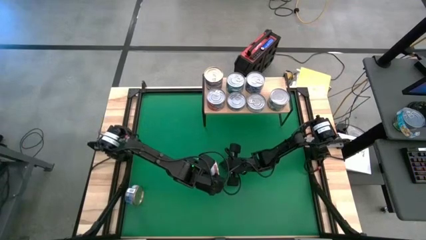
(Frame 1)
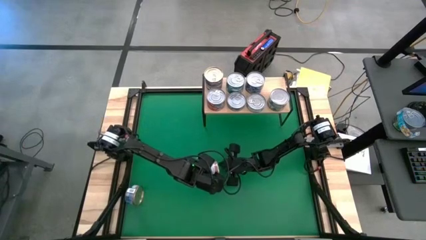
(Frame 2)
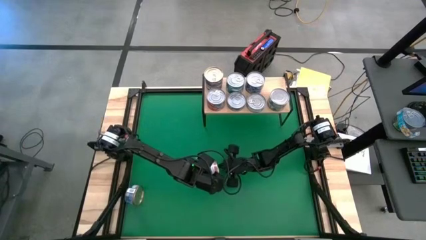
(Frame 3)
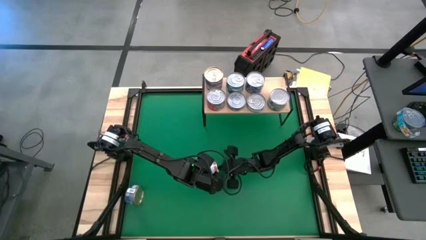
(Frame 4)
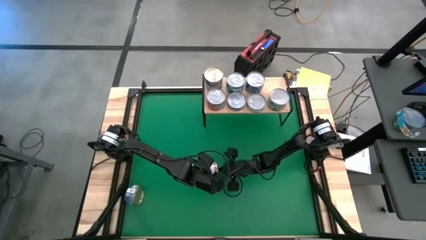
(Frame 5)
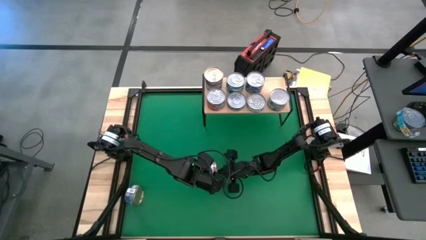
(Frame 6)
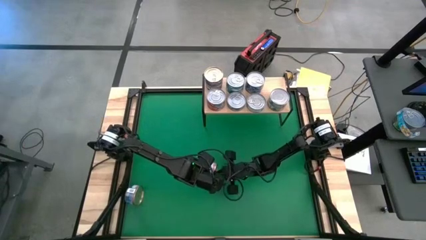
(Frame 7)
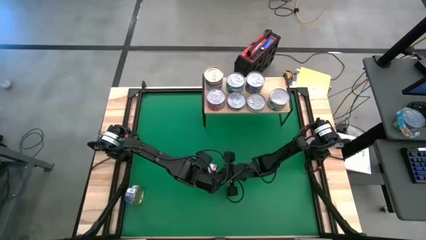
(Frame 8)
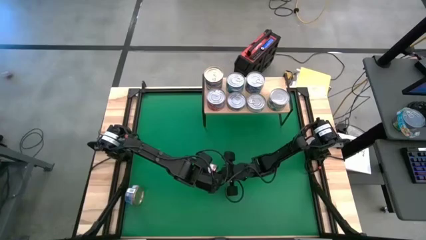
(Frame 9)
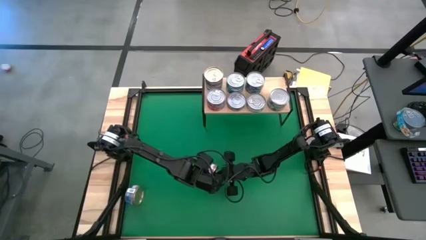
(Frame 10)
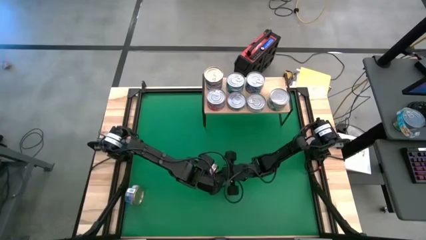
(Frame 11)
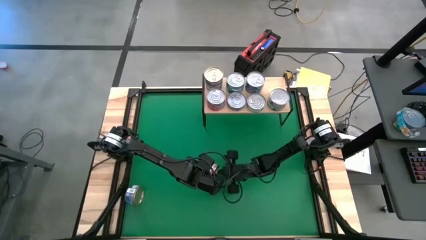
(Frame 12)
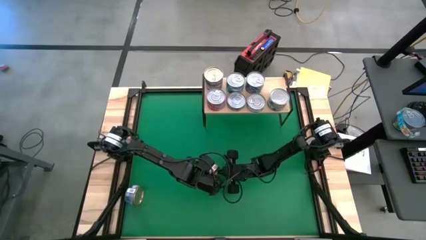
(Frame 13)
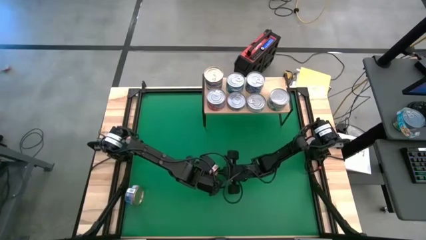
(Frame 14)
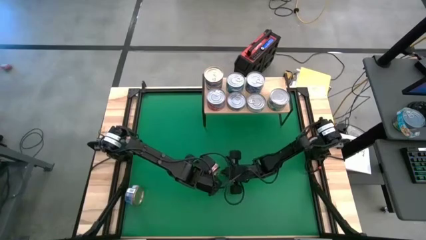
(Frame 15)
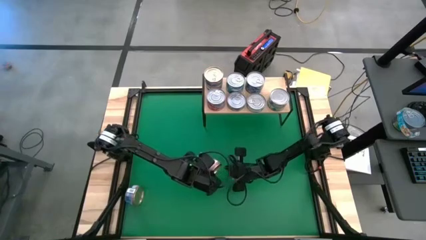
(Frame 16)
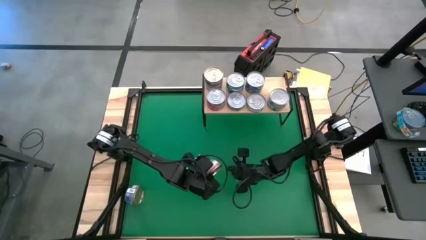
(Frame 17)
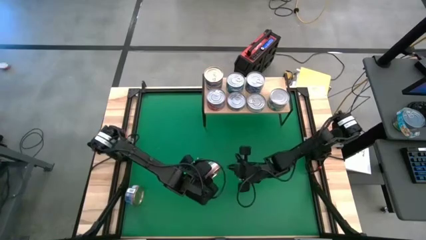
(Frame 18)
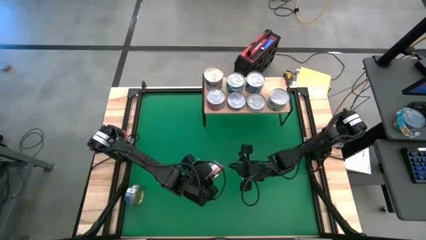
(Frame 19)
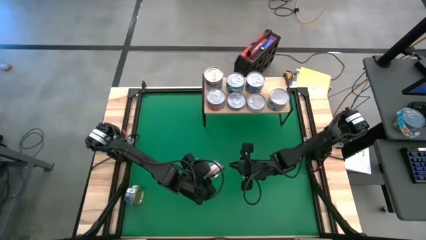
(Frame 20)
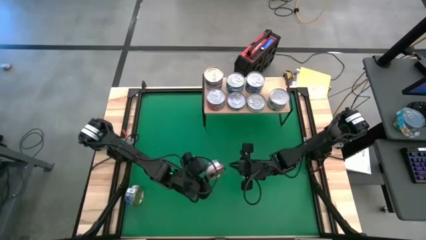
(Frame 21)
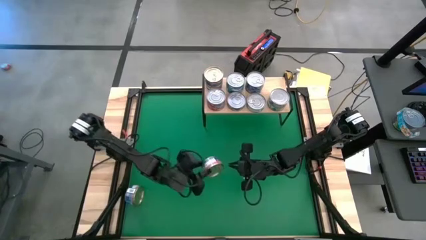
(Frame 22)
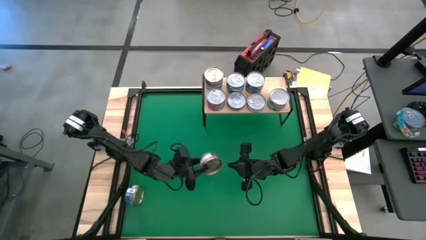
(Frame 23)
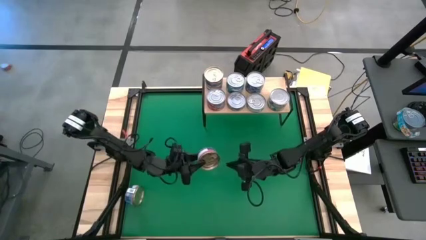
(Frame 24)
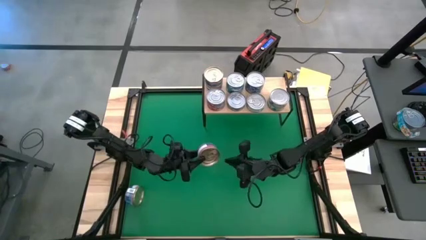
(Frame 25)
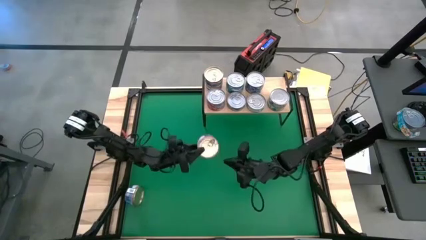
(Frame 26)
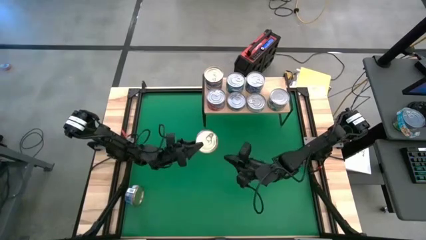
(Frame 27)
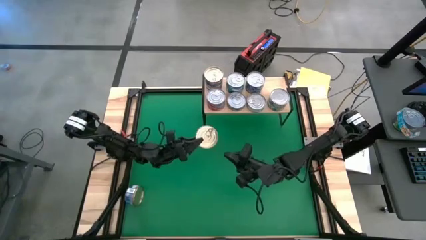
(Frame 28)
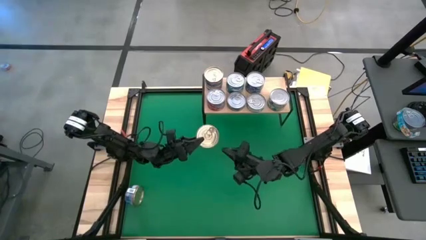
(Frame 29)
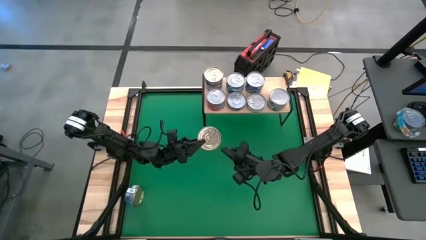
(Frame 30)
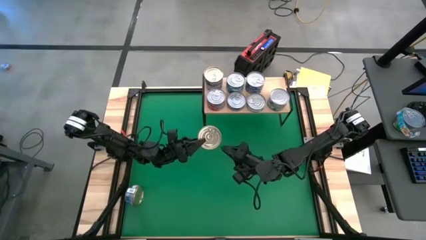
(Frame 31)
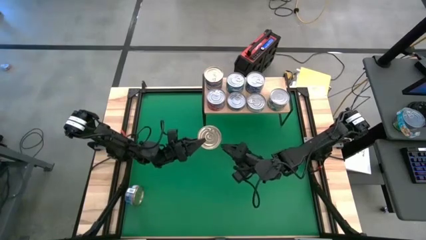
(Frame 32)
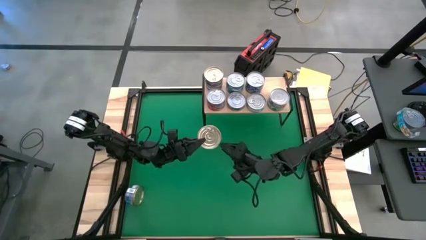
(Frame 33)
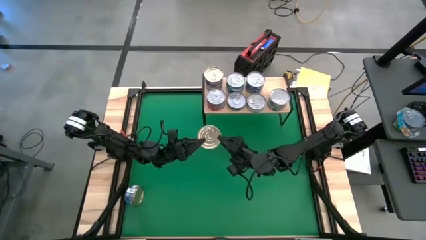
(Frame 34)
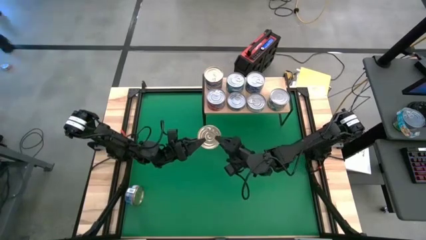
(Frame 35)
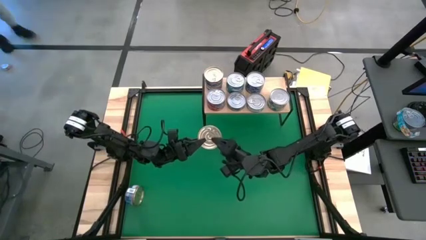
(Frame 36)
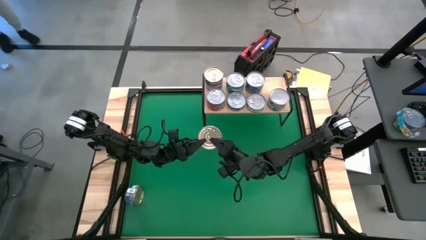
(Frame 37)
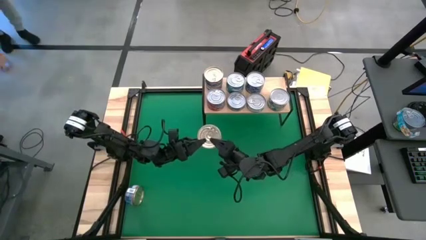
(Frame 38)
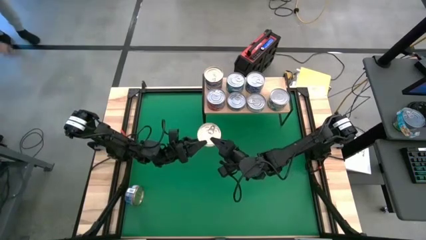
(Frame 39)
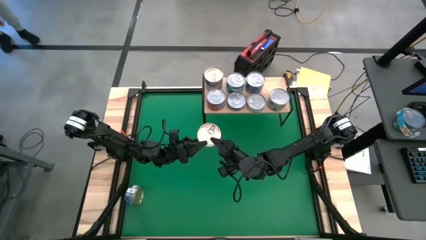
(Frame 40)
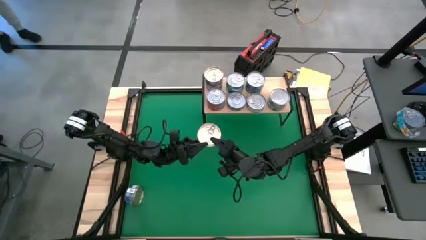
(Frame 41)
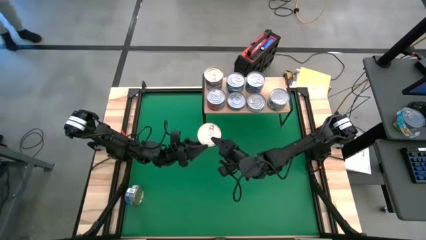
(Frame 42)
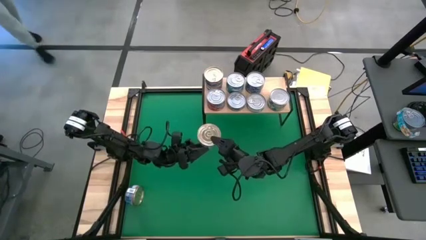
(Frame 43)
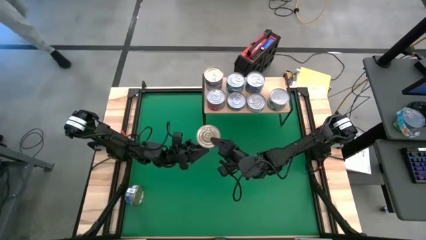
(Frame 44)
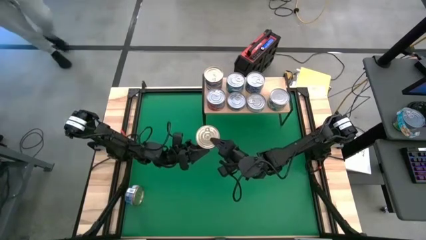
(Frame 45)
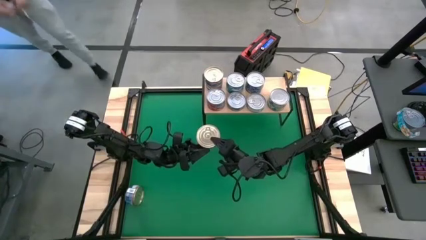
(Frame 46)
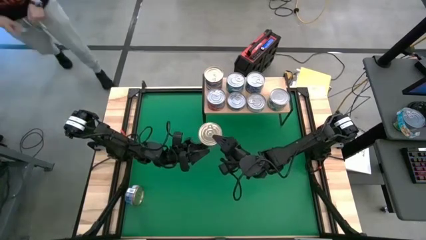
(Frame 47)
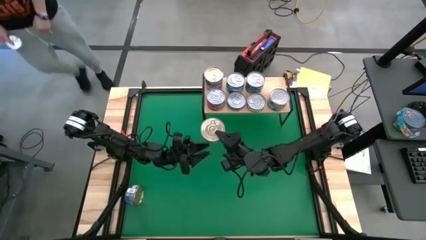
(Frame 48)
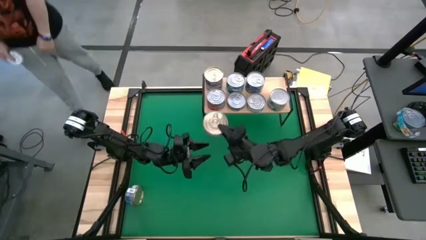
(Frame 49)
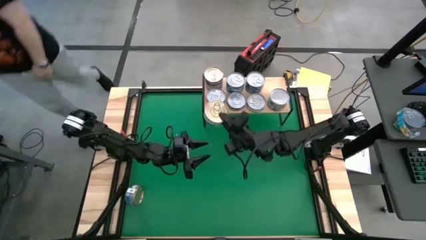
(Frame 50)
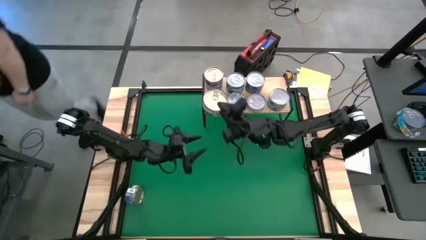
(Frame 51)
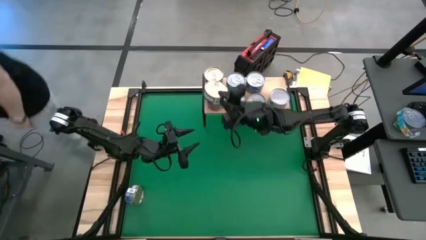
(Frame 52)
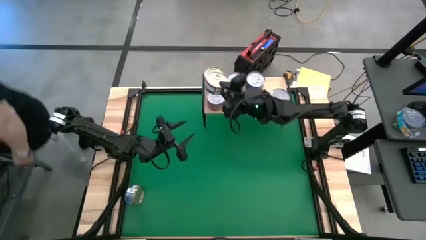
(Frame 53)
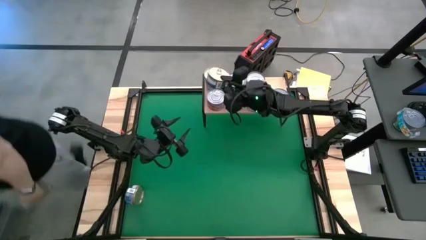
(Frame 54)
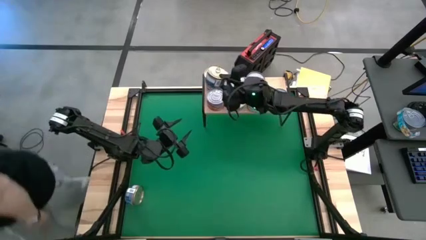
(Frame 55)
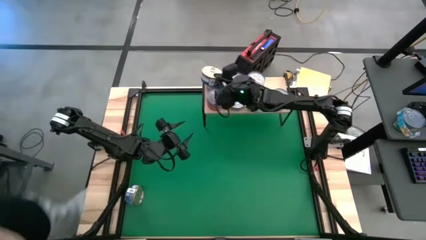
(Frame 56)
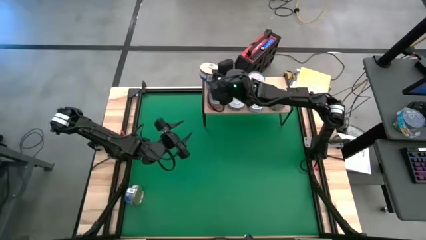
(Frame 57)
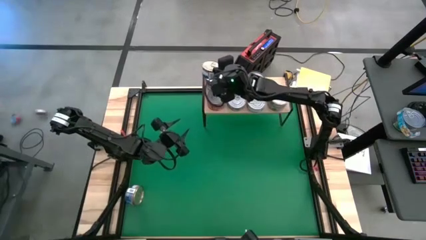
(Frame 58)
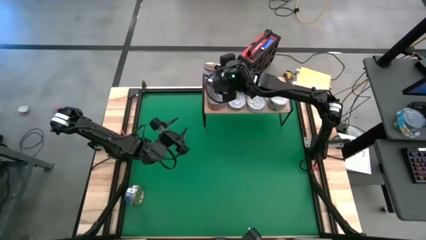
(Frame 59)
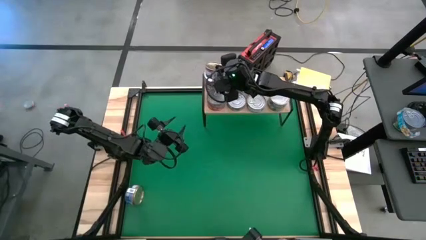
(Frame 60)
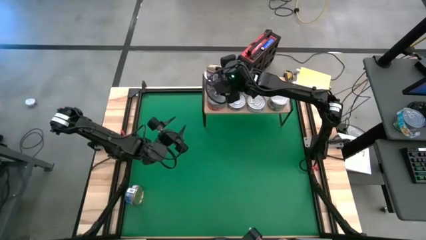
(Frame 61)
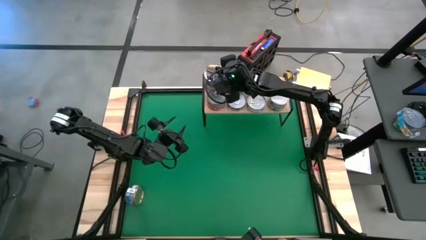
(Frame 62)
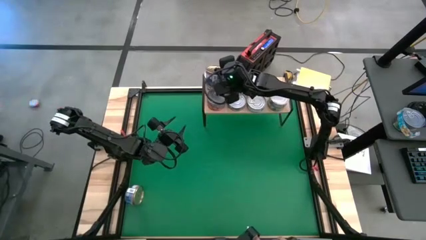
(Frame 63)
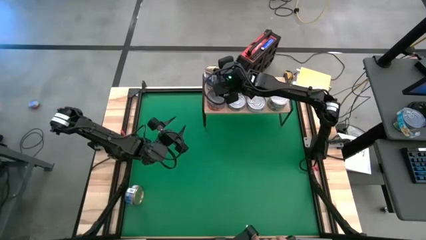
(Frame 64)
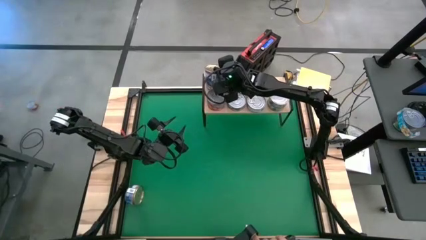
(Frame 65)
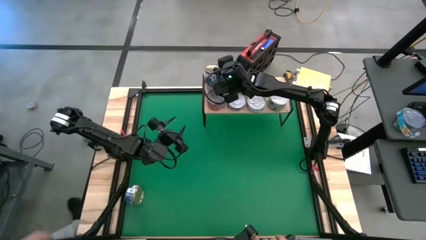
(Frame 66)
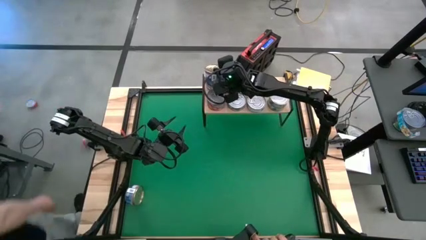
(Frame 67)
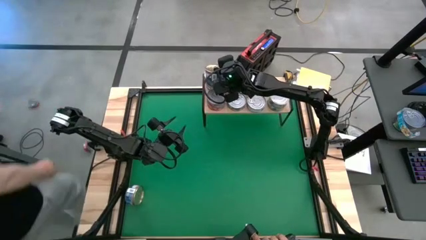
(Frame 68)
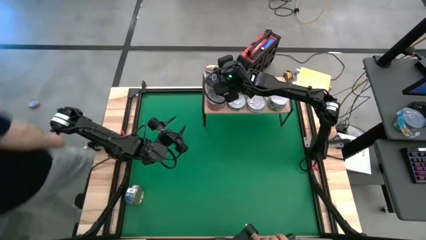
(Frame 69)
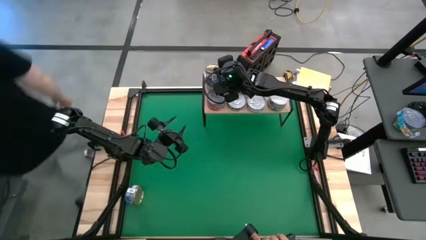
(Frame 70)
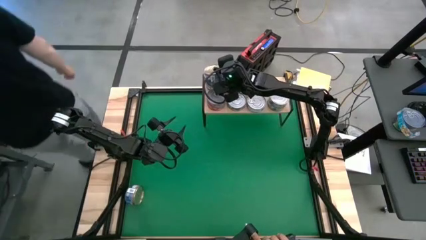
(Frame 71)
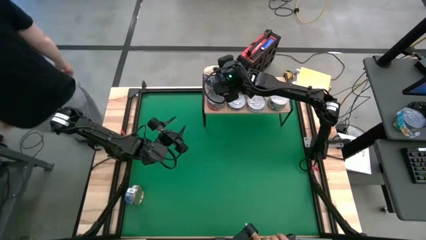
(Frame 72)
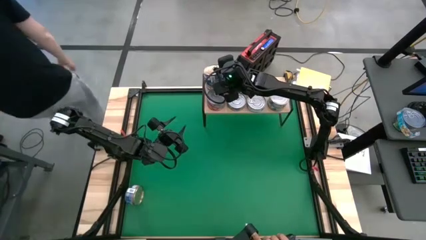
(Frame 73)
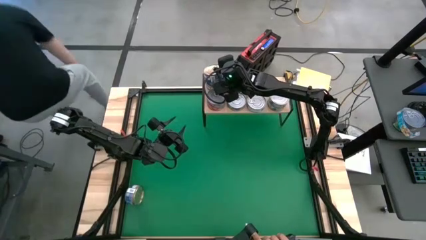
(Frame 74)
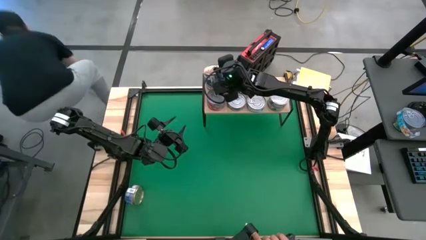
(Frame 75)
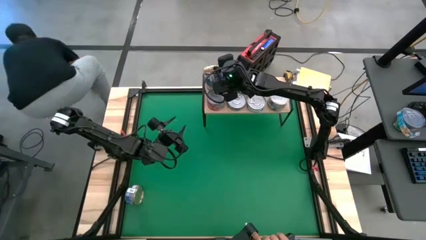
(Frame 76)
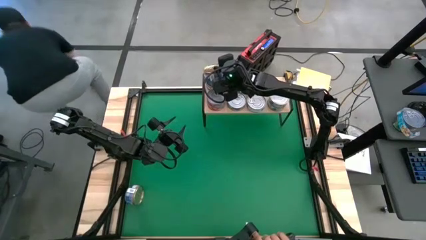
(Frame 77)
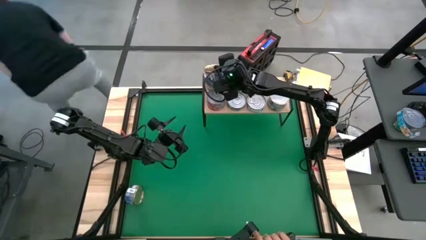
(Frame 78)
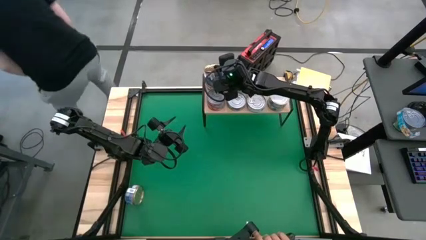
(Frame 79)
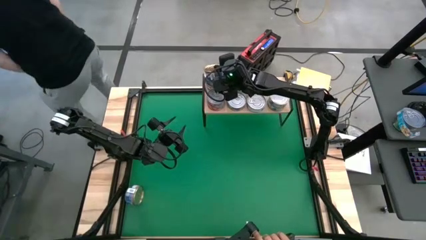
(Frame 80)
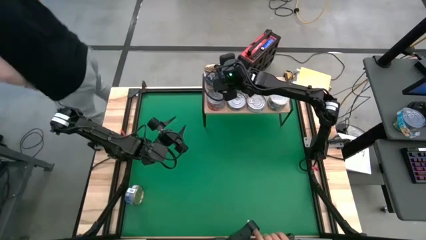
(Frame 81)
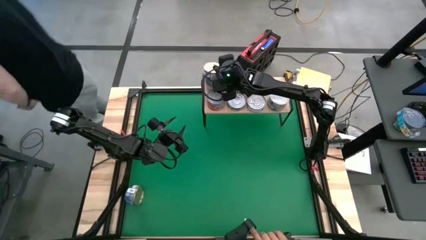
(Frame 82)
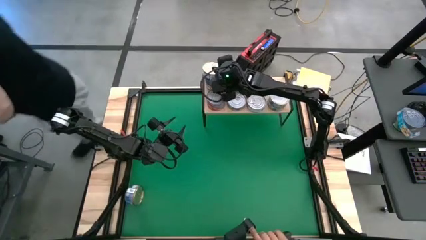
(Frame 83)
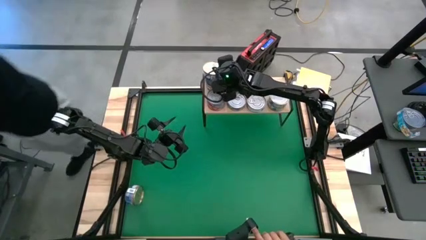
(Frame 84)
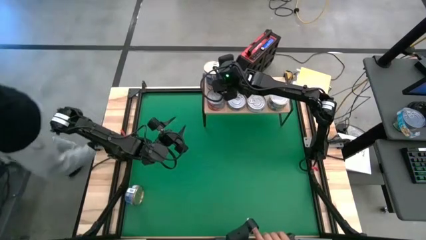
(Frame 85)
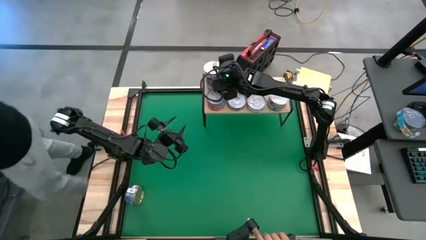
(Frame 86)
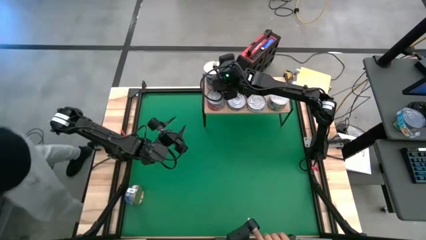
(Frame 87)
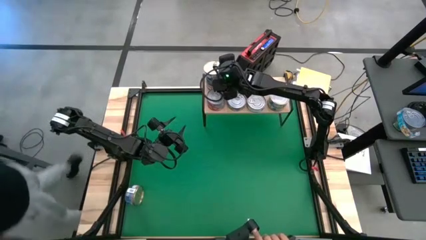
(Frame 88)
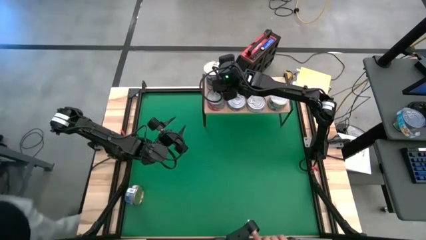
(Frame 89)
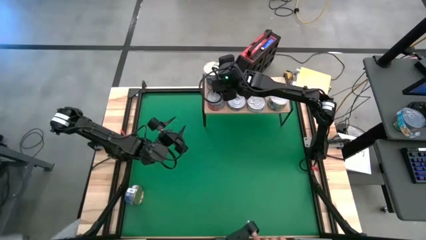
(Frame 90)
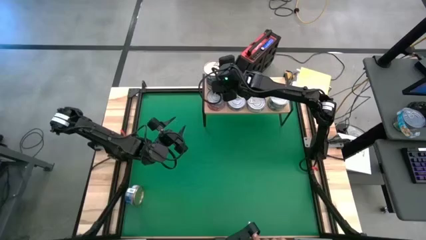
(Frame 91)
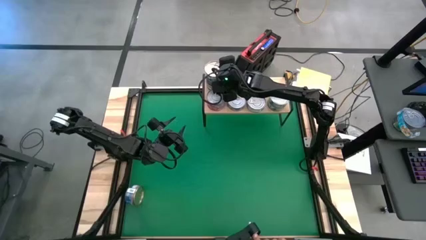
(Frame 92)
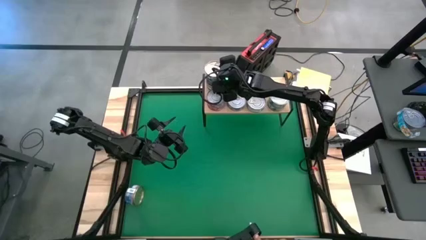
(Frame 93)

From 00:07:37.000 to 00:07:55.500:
Task: Stack canned seafood by type on shelf
Stack the blue/pink tuna can on top of the other blue/pink tuna can on the shelf
